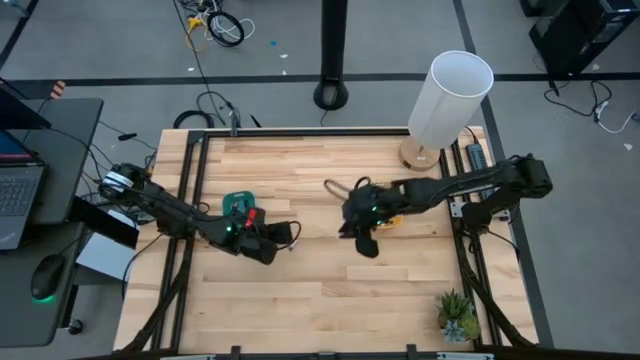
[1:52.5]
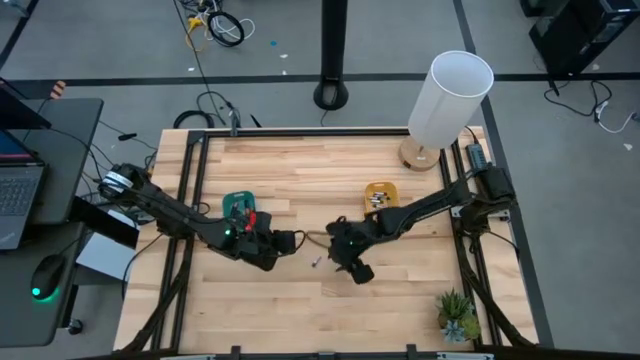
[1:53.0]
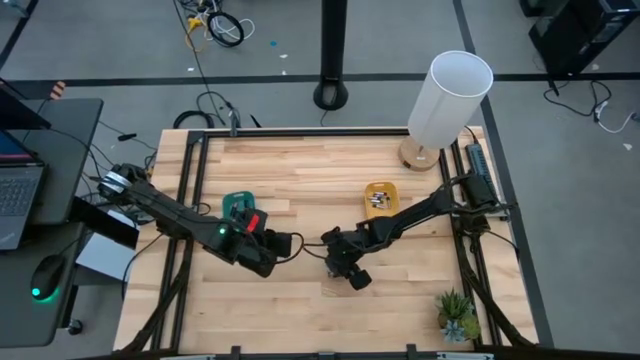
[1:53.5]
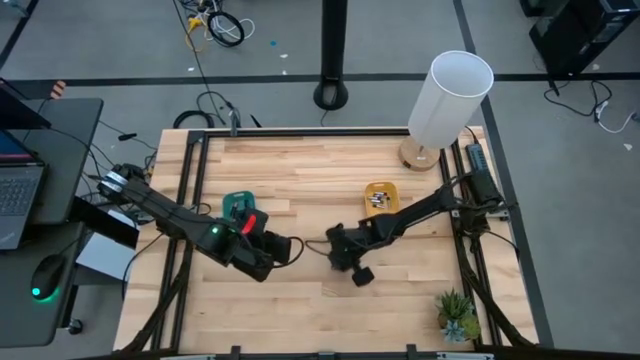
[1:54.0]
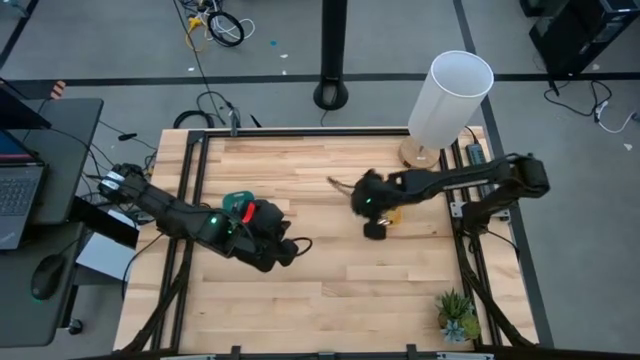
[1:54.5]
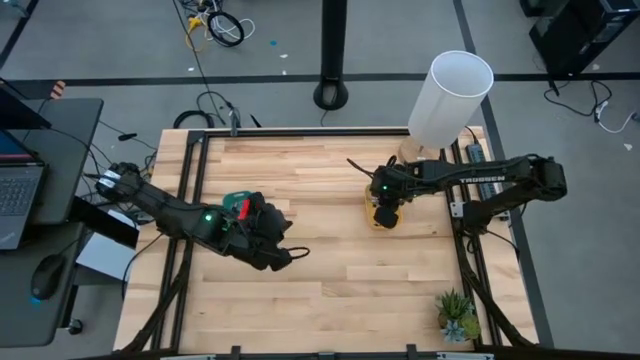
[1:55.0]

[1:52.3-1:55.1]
Task: Sort batteries
Put the silver battery into the yellow bin

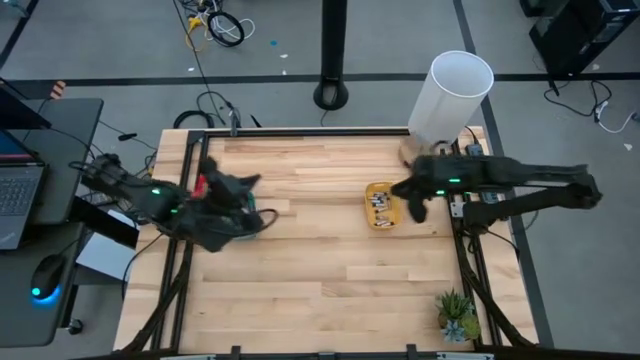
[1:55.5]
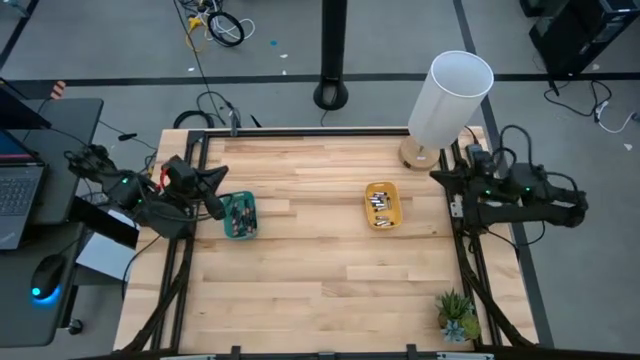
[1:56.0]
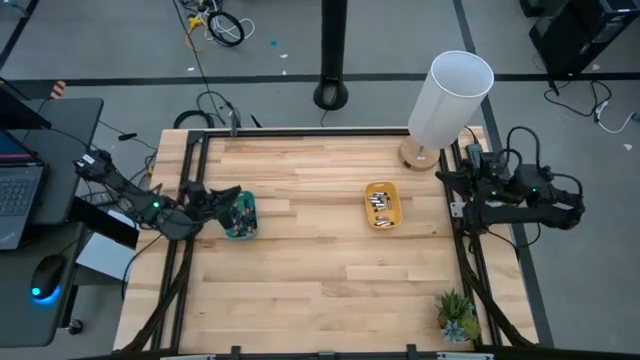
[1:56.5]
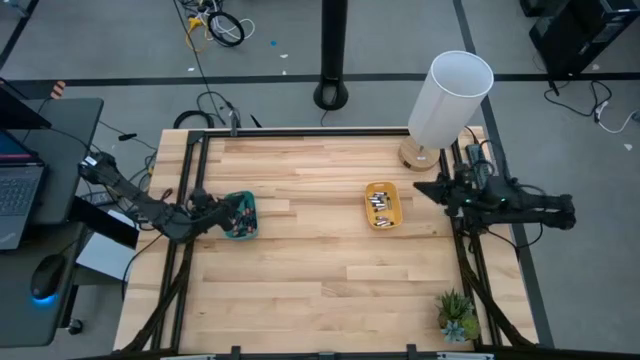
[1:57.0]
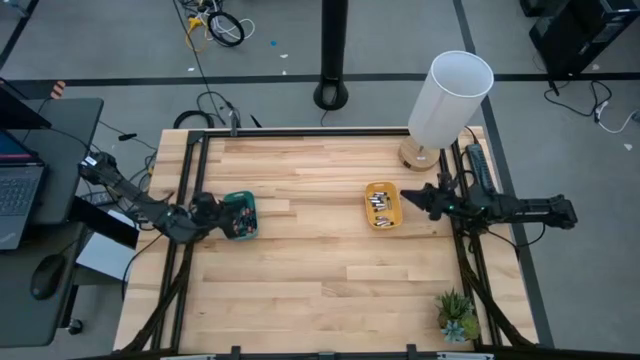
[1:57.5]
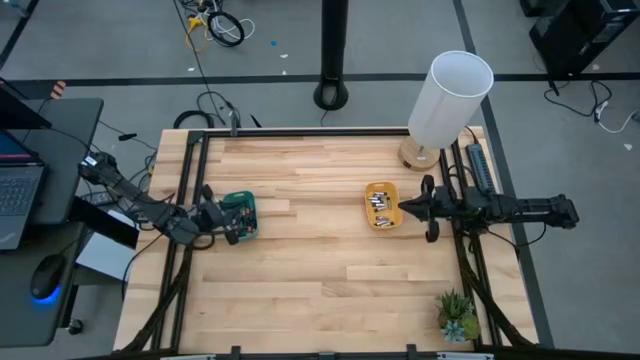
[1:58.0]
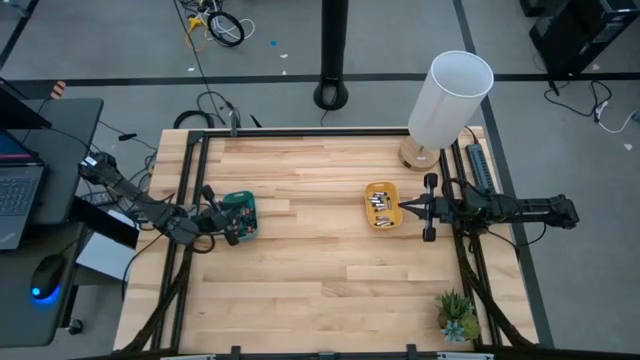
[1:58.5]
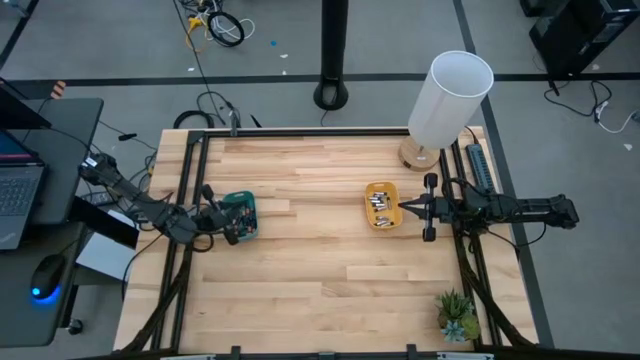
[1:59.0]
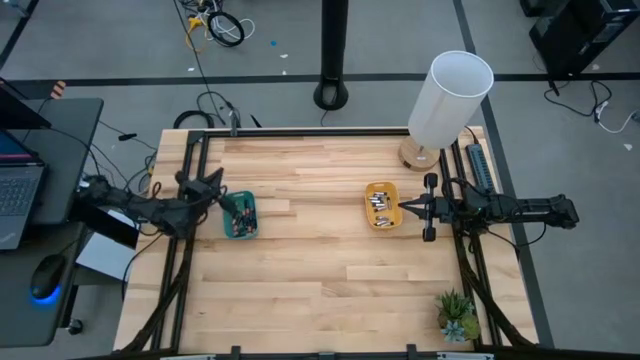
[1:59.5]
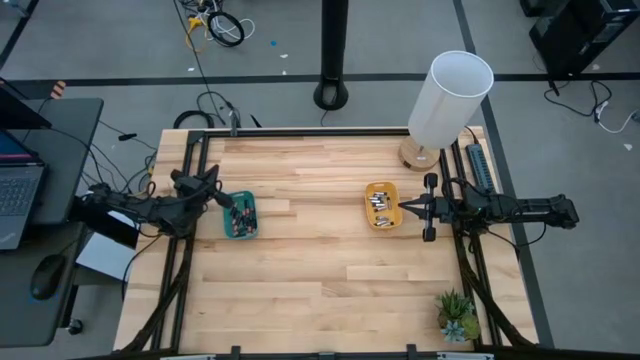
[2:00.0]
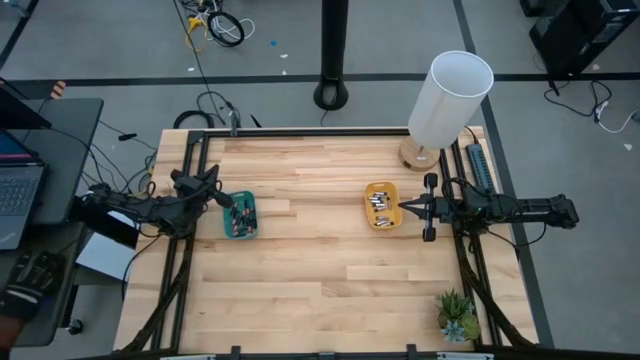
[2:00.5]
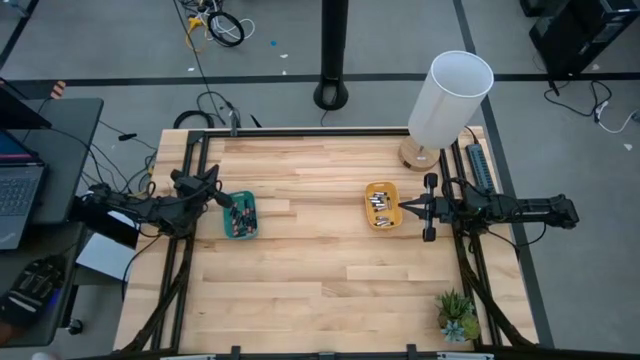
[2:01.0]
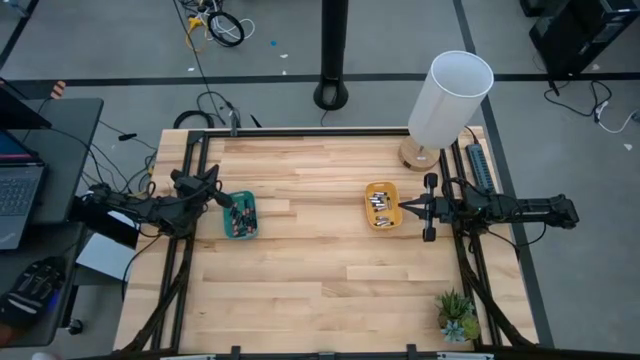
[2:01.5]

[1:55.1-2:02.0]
Return to Home Position

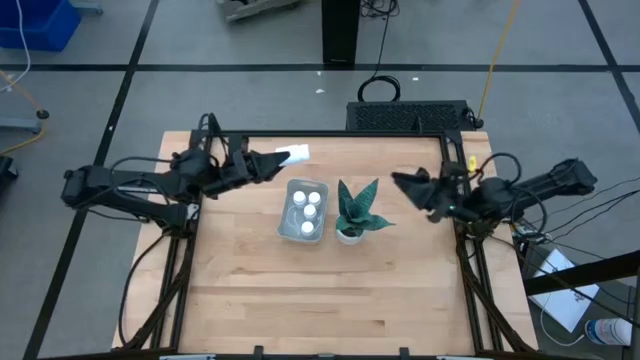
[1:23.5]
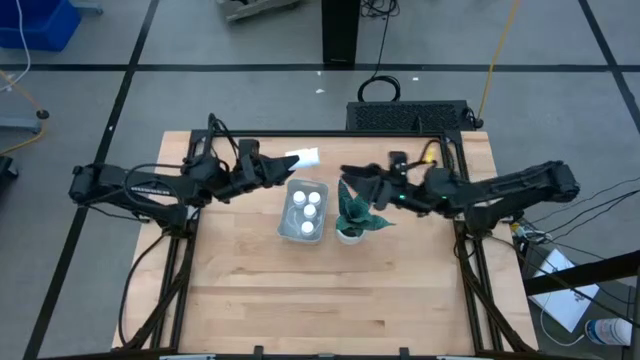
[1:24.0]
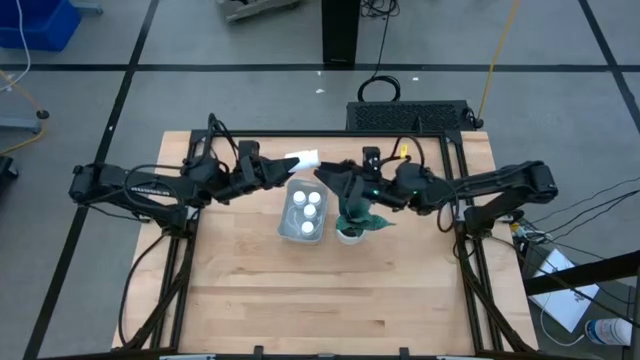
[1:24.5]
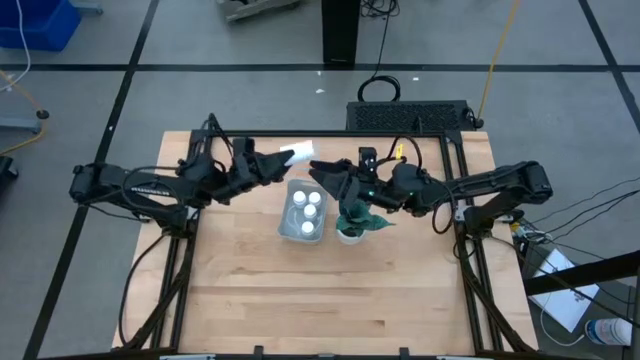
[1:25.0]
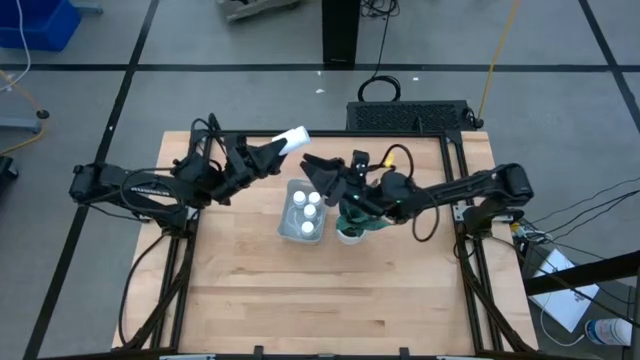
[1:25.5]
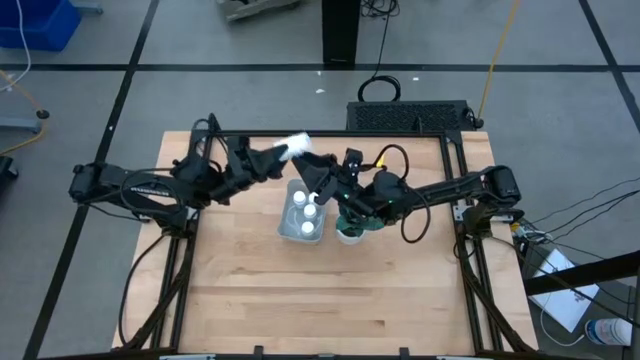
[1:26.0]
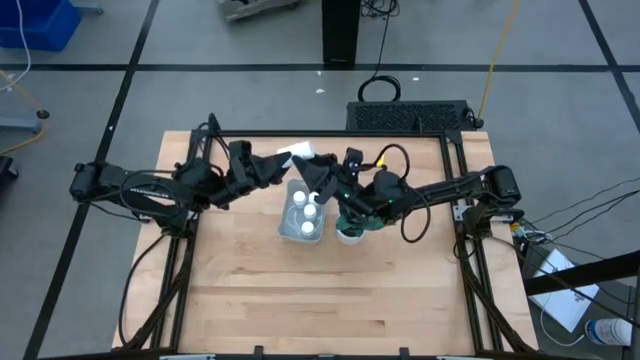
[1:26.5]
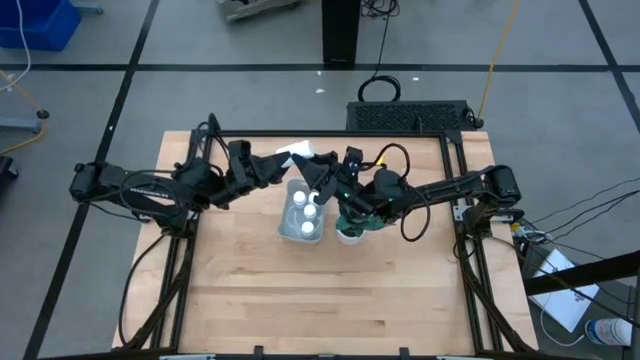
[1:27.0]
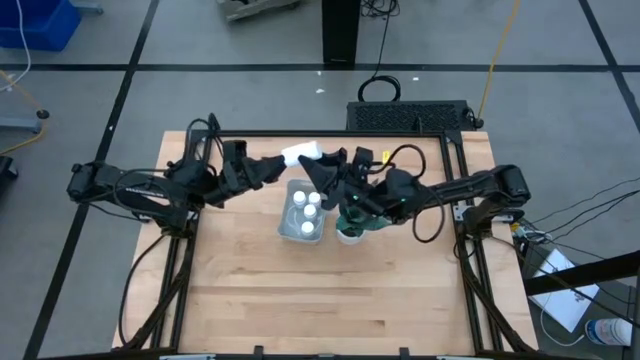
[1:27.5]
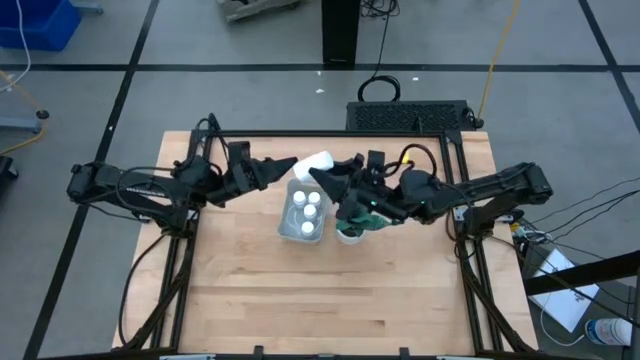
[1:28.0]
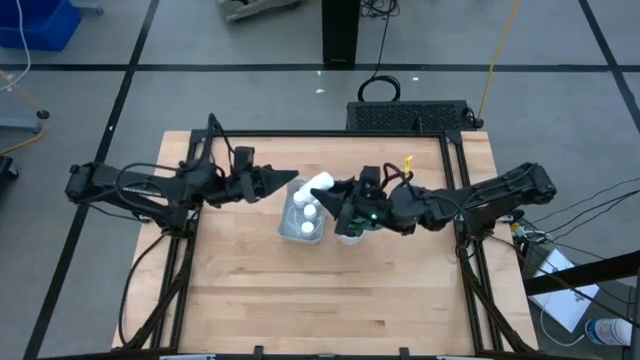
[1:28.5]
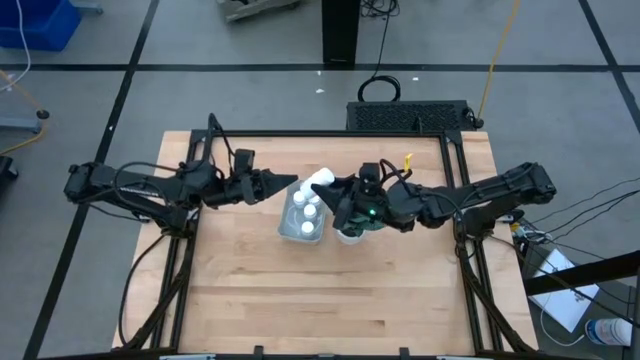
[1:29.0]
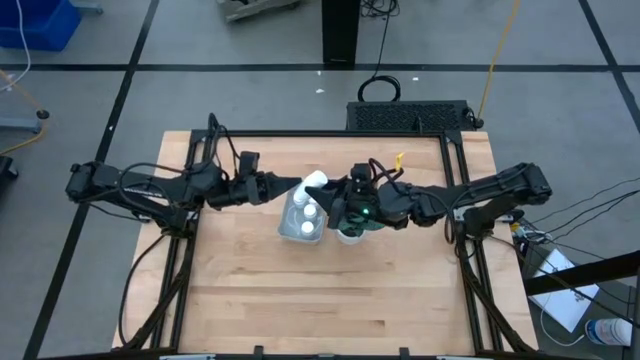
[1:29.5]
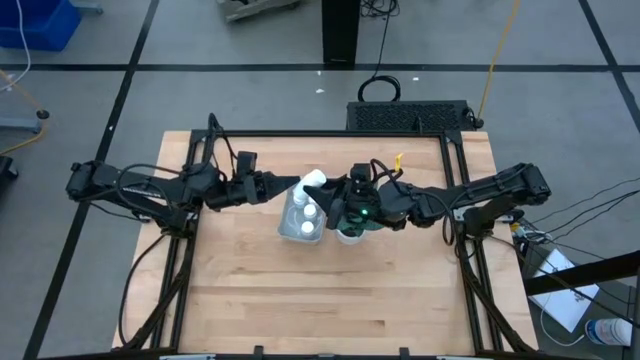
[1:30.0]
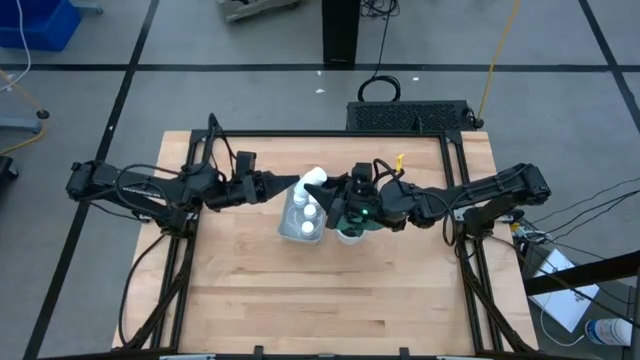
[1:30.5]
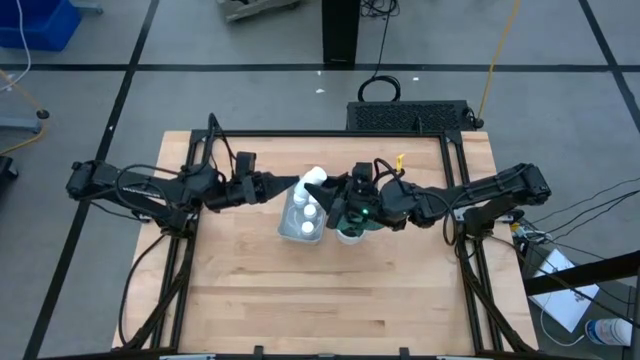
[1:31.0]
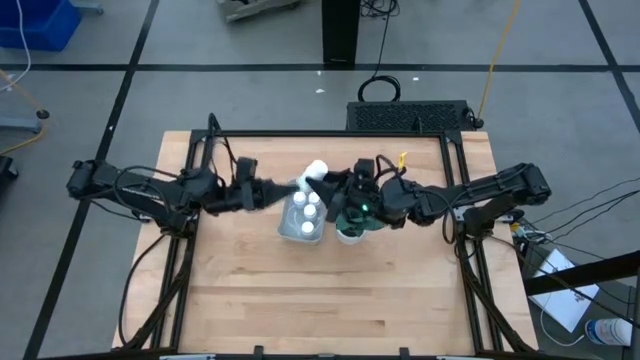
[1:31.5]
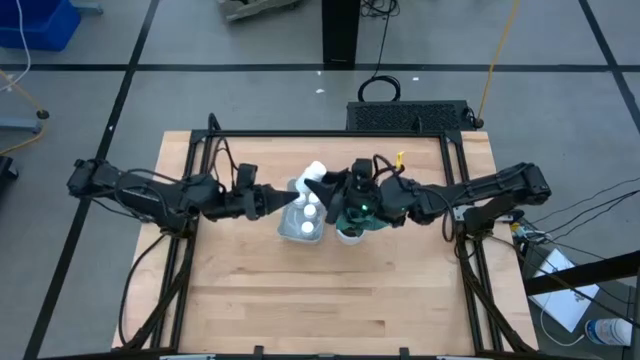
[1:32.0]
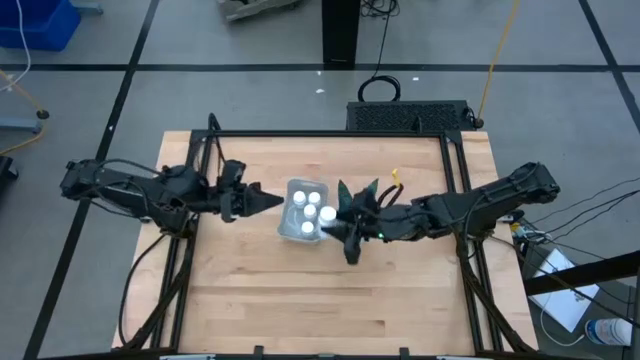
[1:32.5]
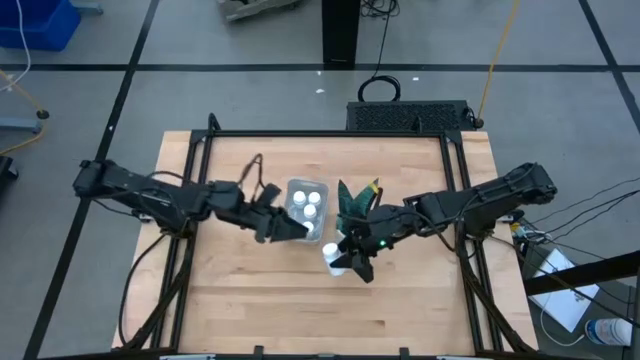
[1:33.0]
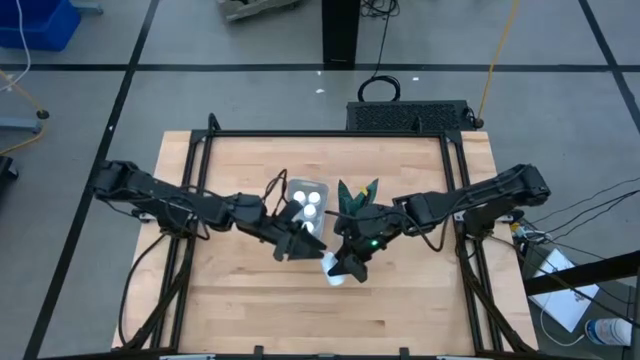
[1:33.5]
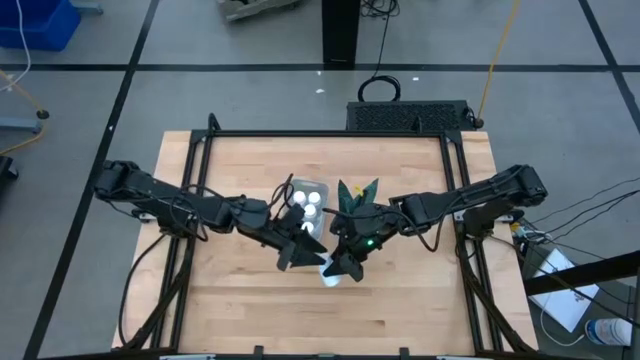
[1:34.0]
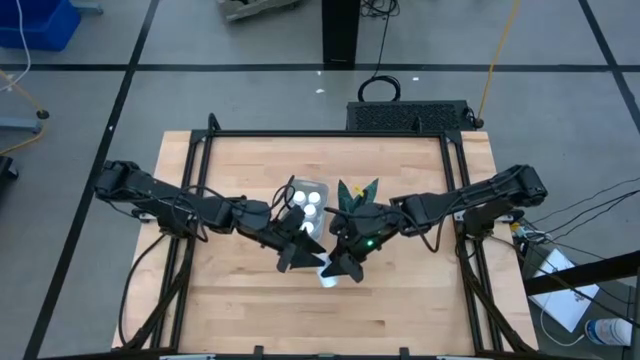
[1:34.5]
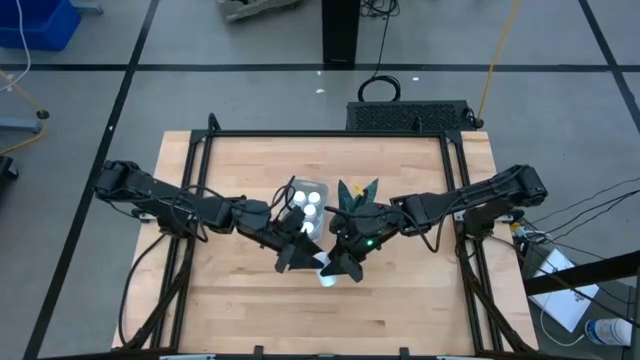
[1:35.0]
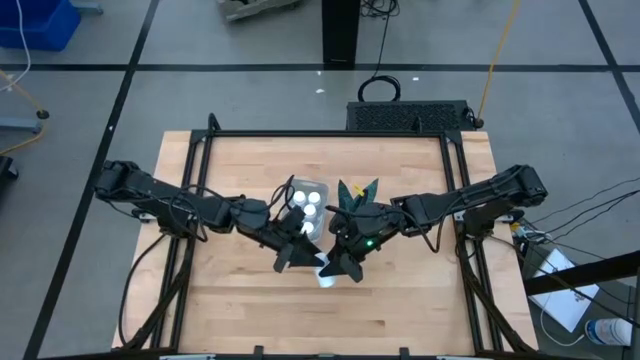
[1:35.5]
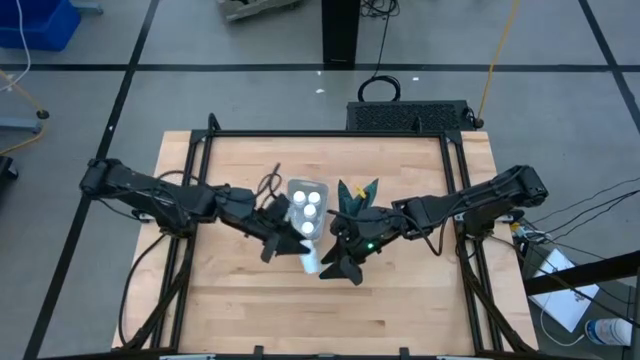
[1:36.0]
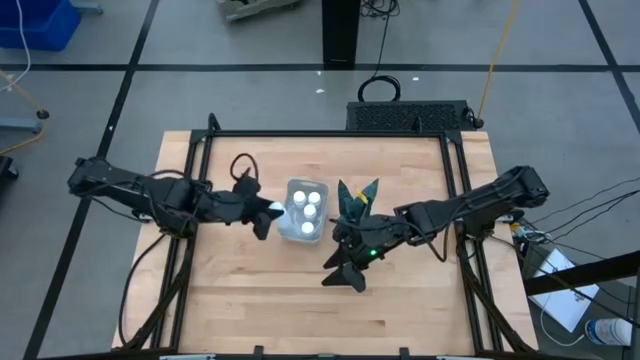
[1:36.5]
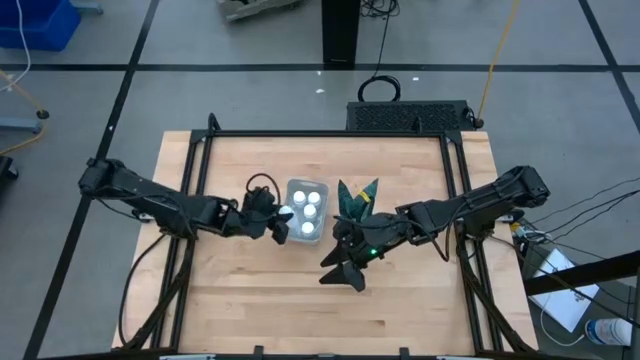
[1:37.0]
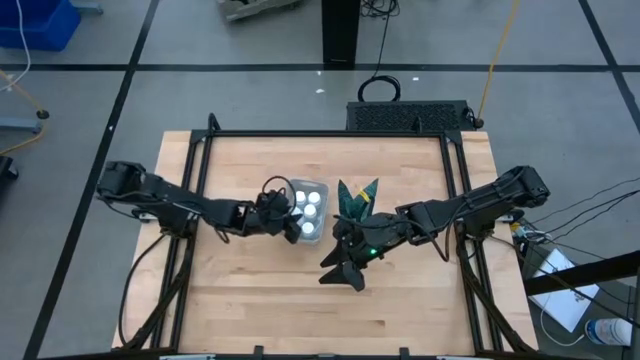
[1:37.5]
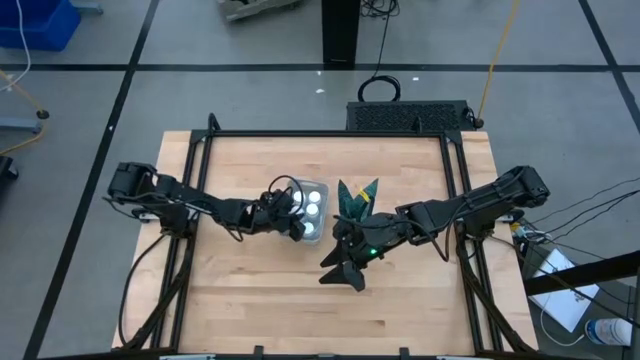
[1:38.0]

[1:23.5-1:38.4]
Task: Pick and place pill bottles into a basket
Put the white pill bottle into the gray bin
